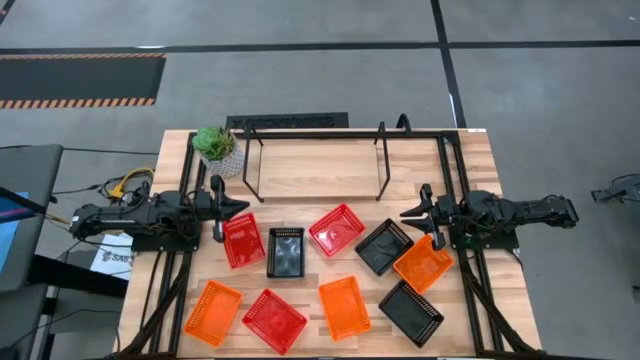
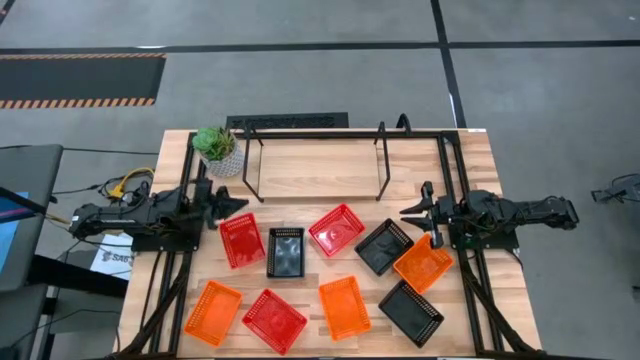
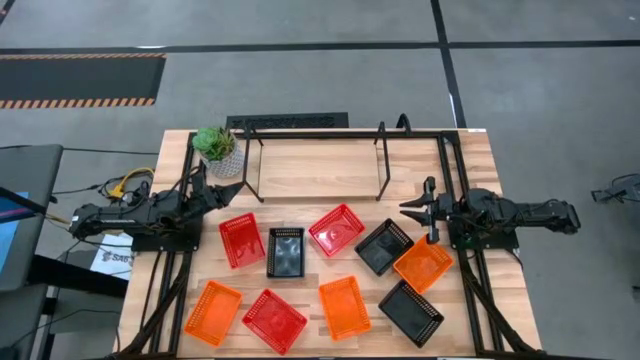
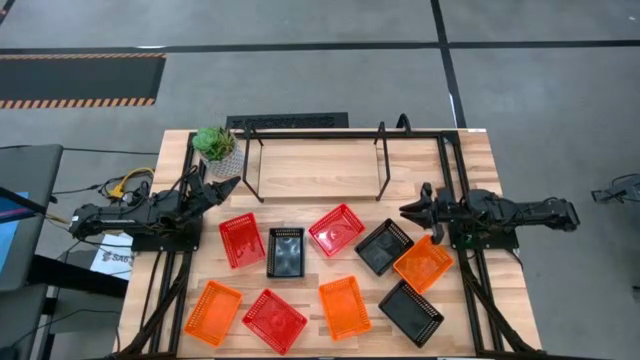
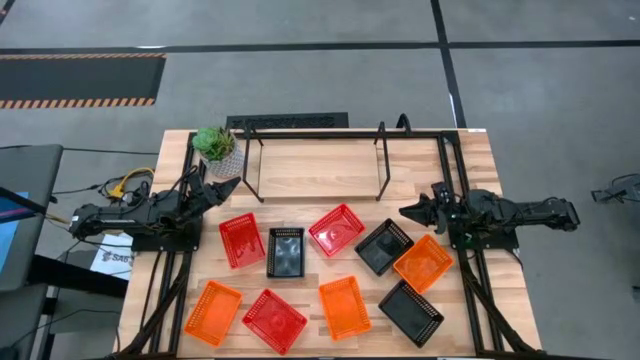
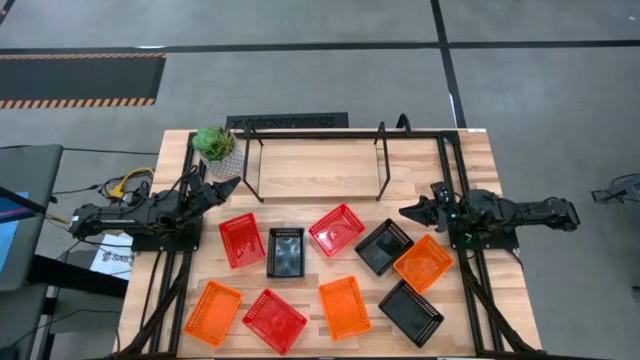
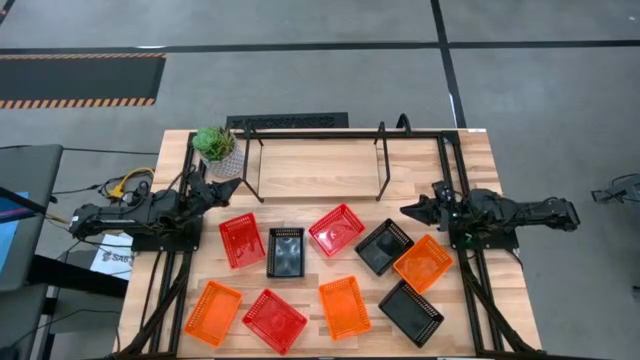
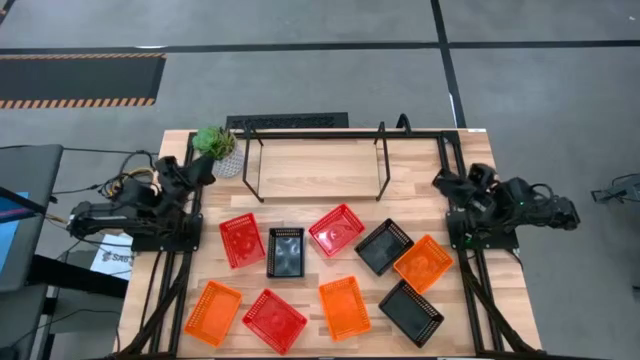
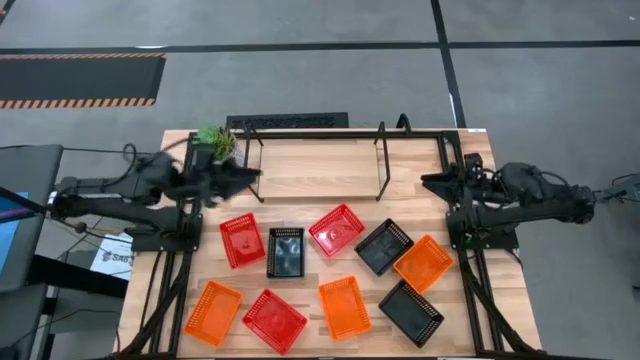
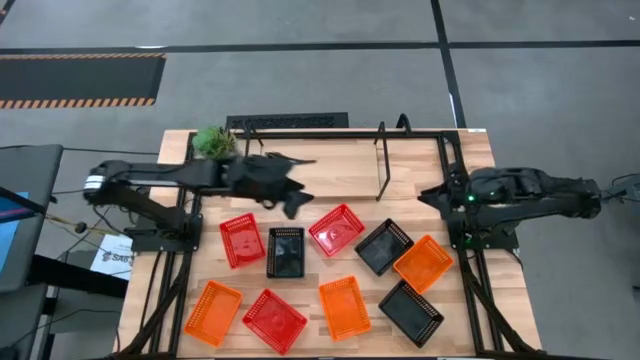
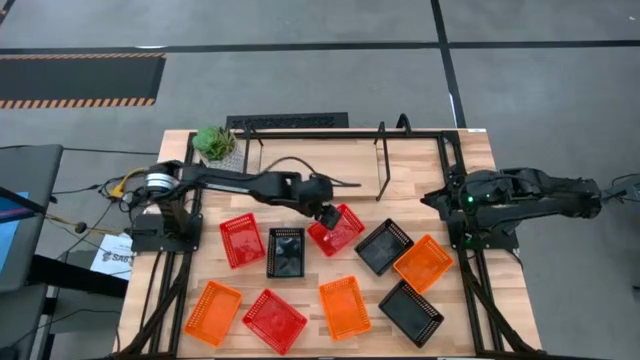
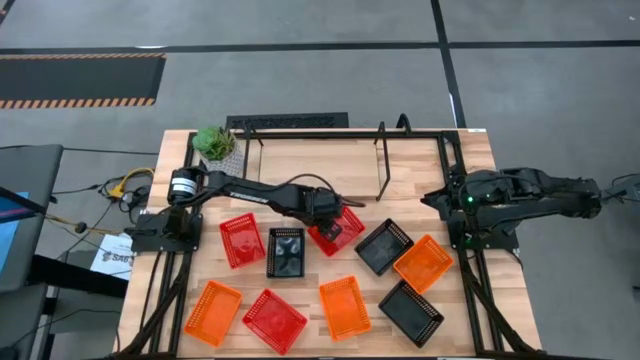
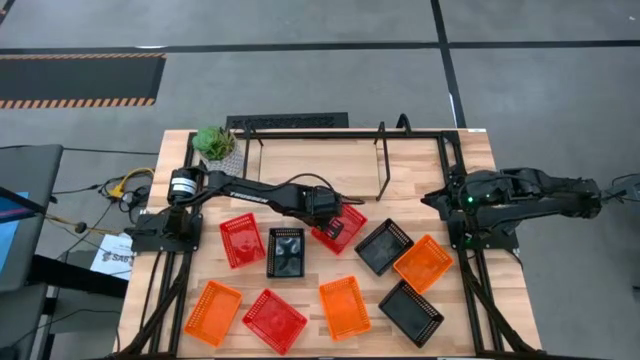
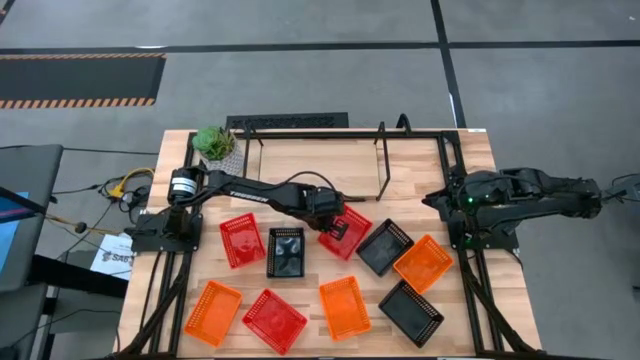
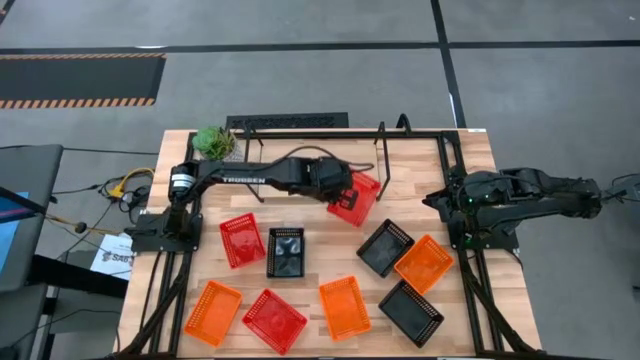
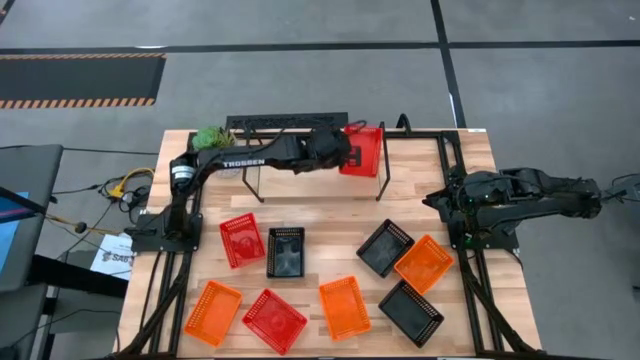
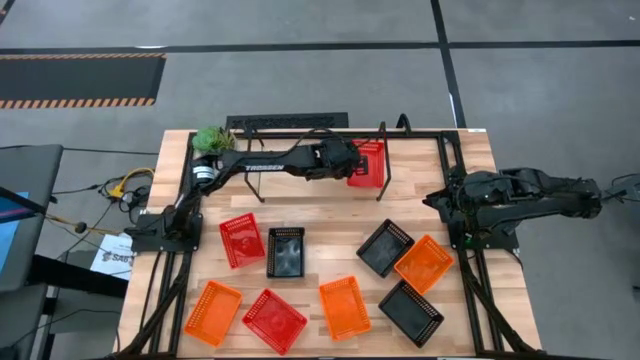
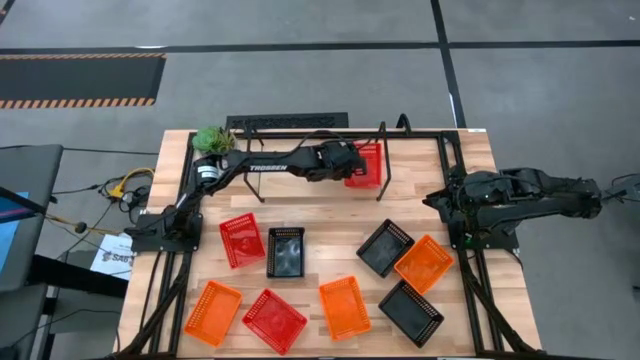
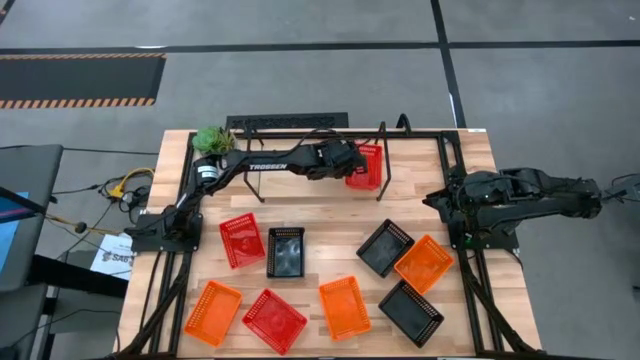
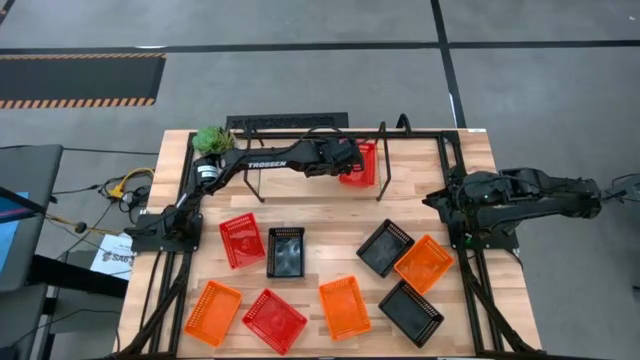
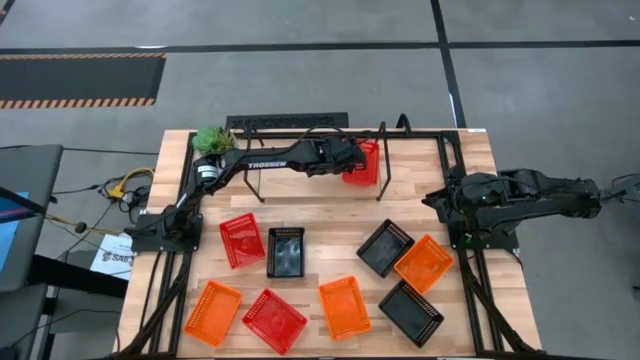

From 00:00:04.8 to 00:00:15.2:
Task: Stack baskets on shelf by color
Put the top right red bin on the shelf

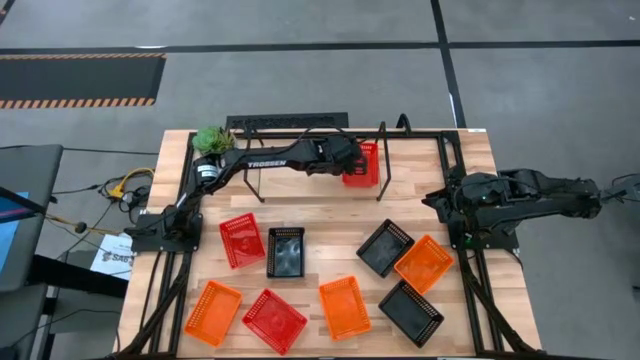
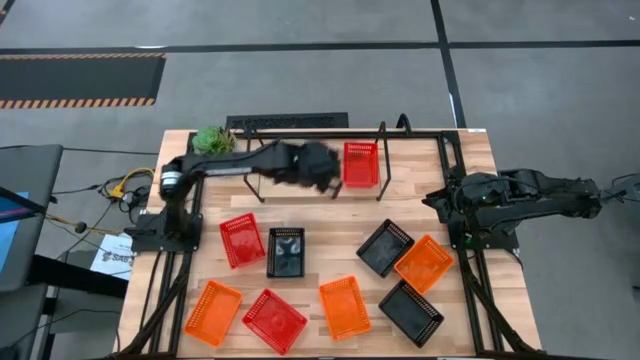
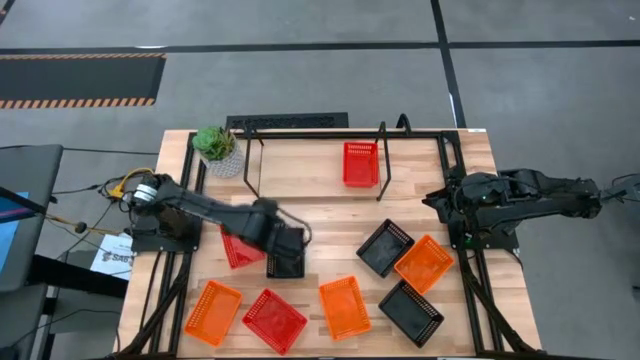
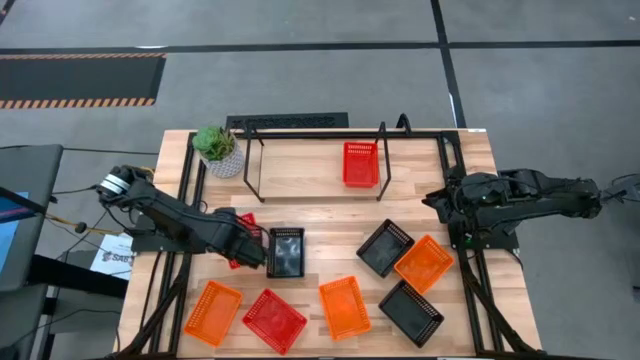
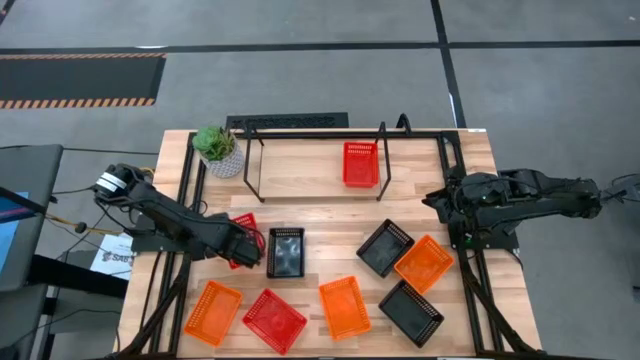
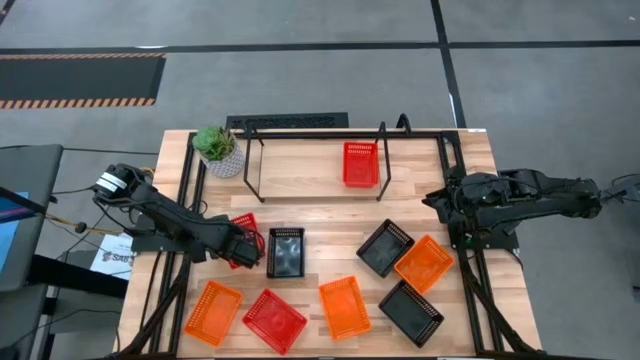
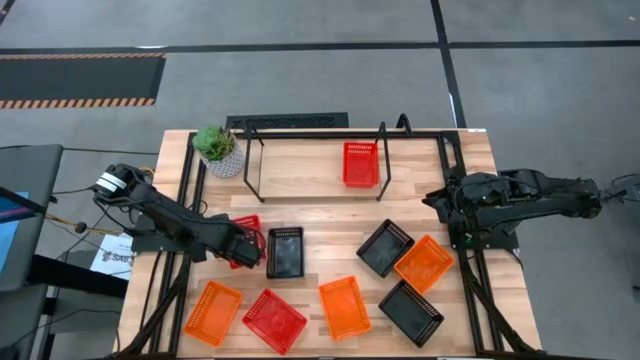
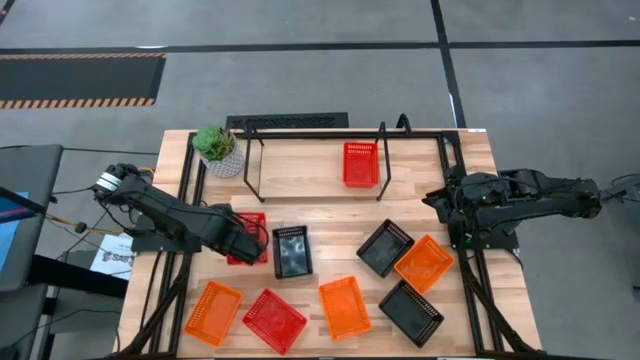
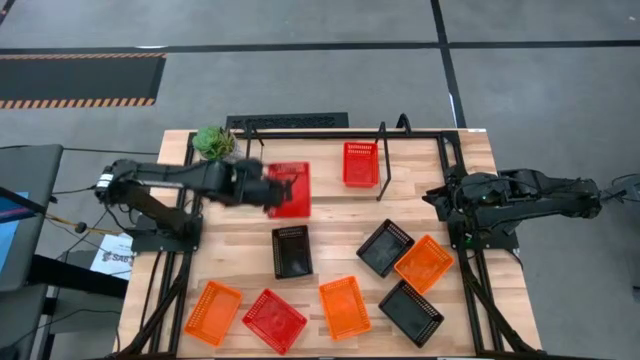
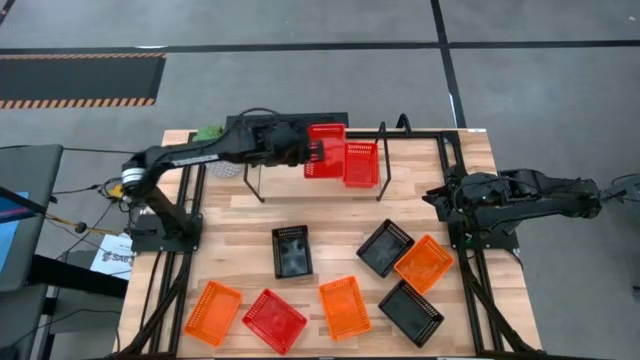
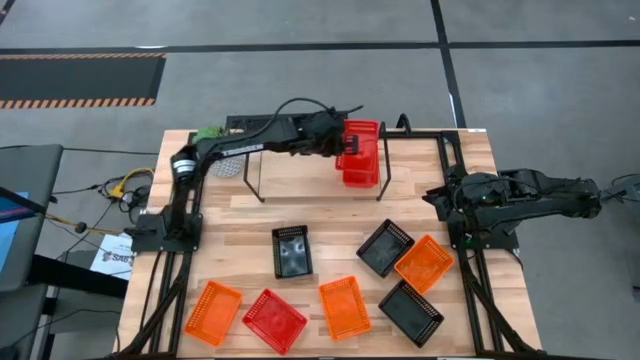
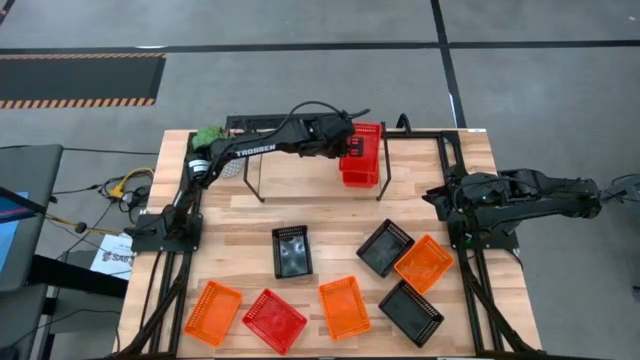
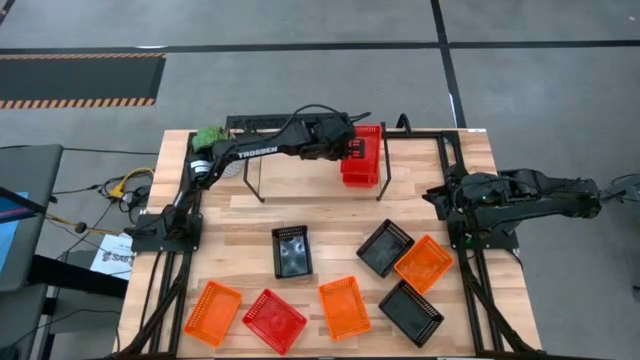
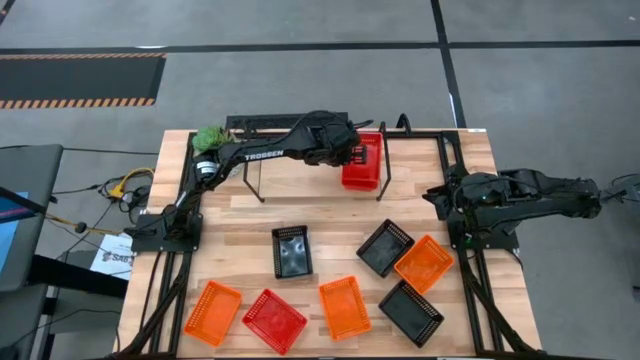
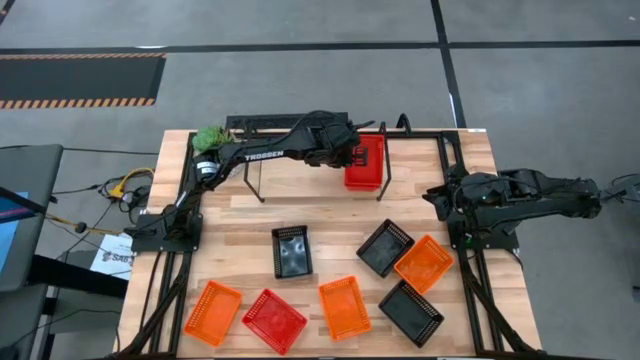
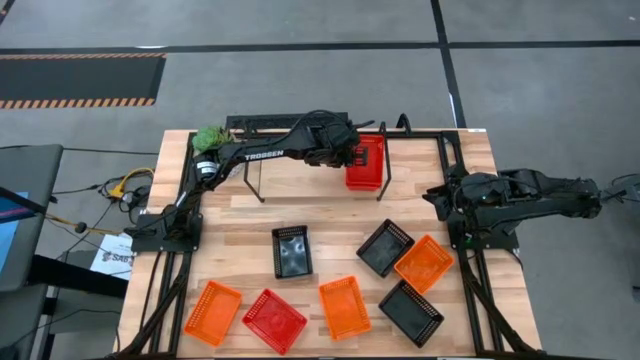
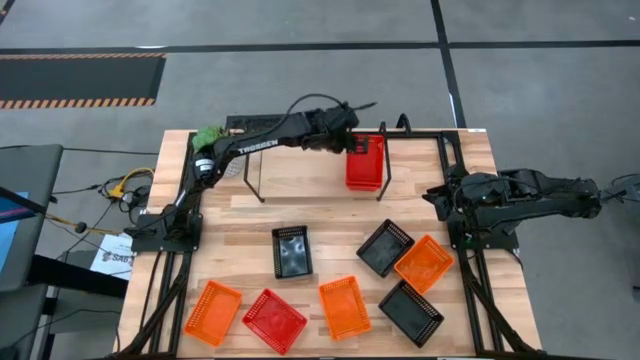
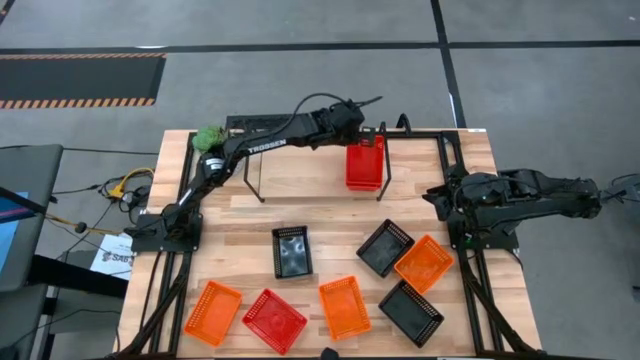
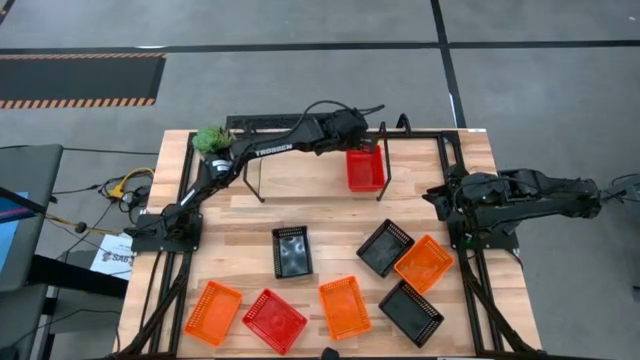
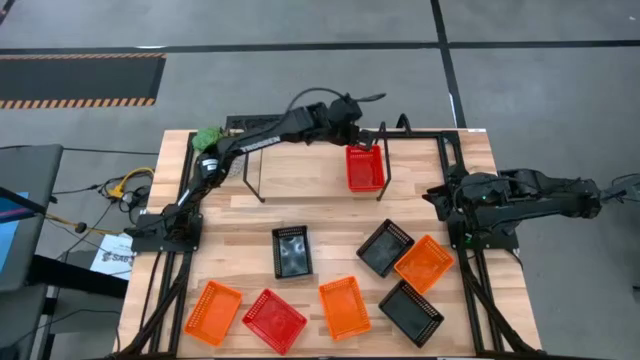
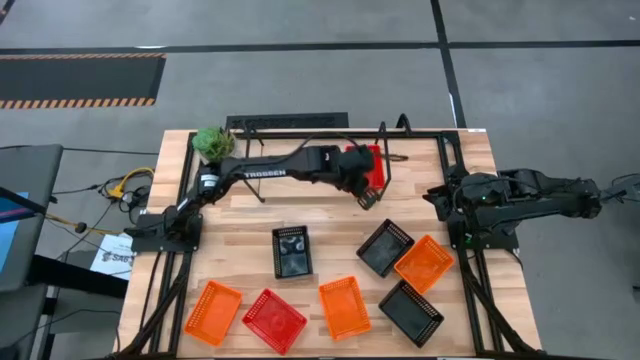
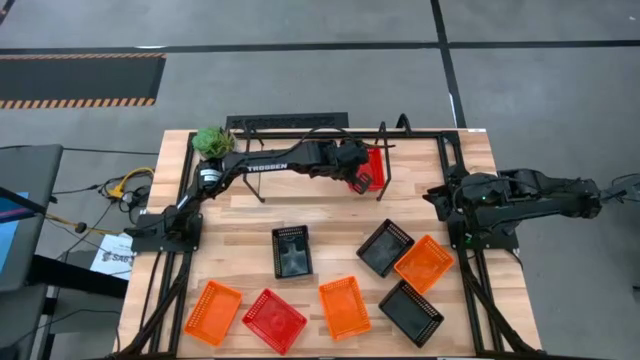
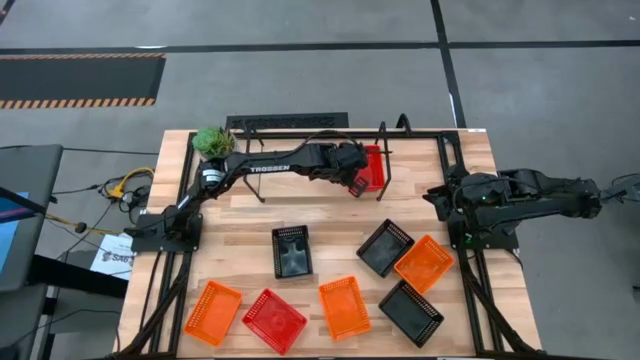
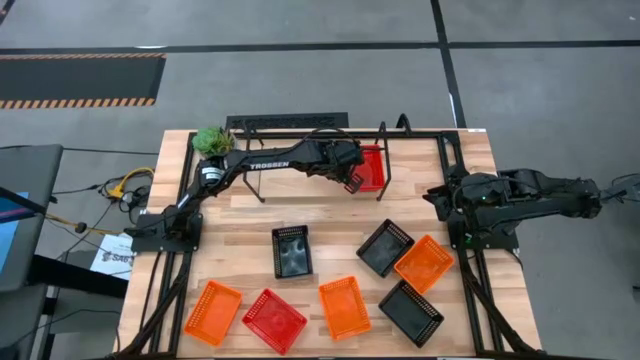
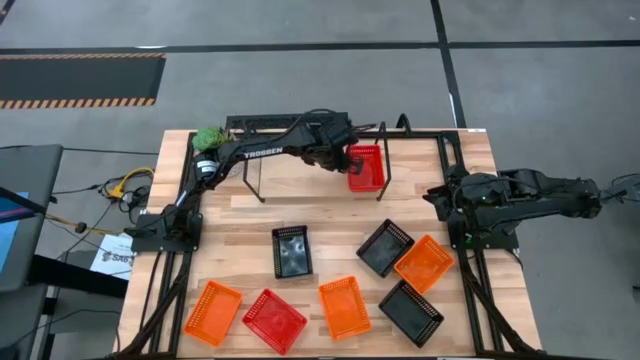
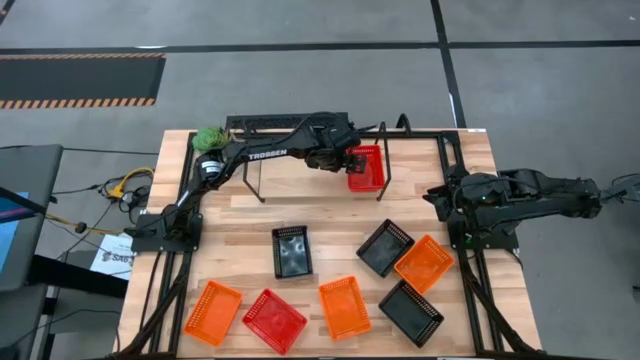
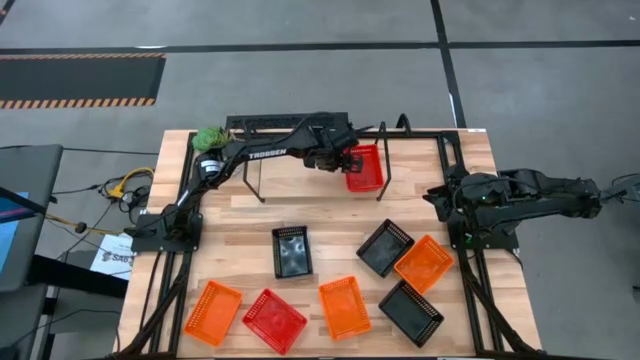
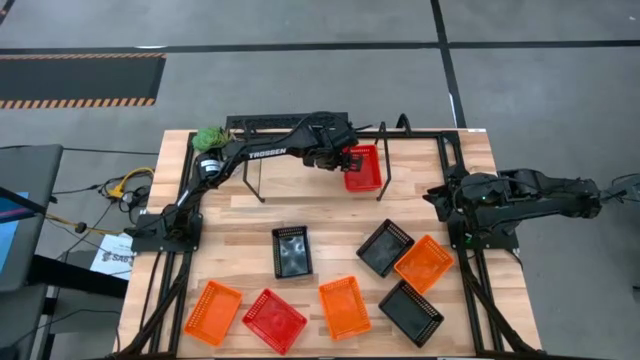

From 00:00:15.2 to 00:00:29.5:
Stack the top red bin on top of the red bin on the shelf
